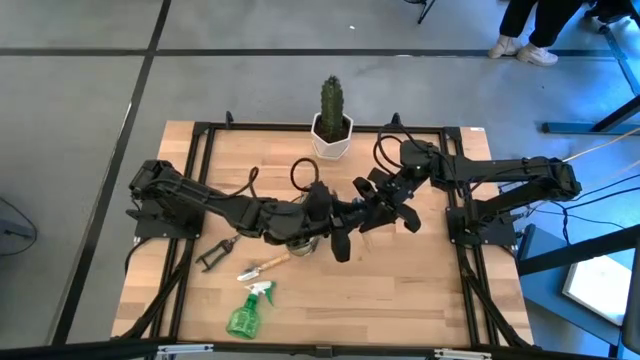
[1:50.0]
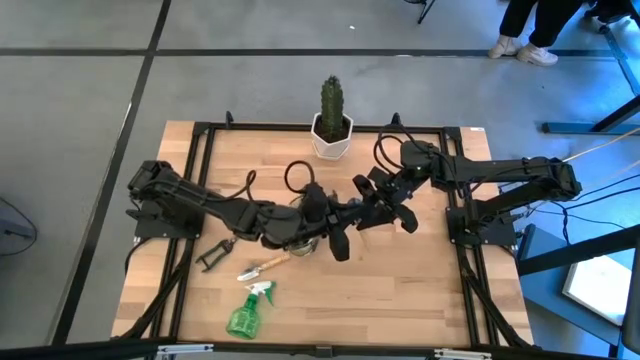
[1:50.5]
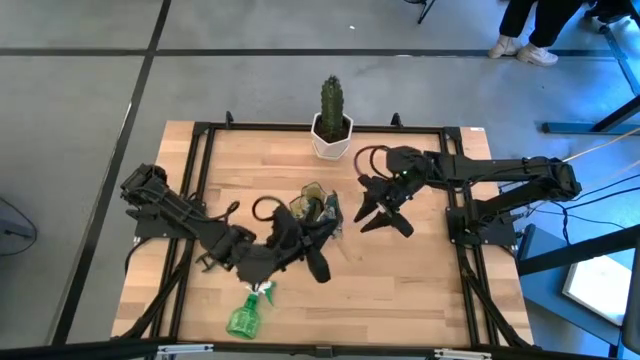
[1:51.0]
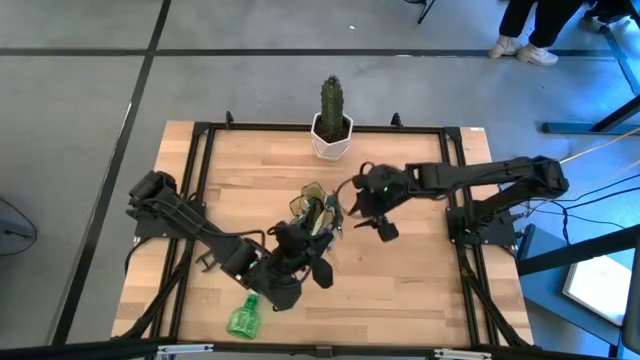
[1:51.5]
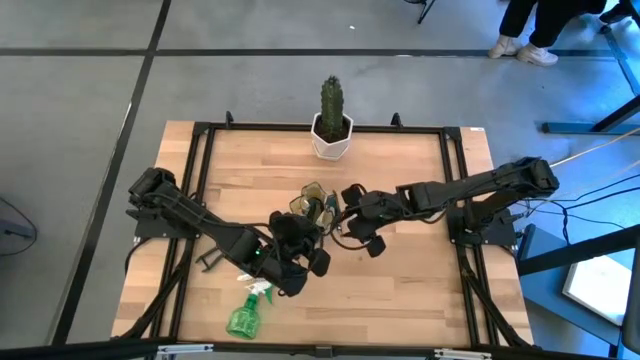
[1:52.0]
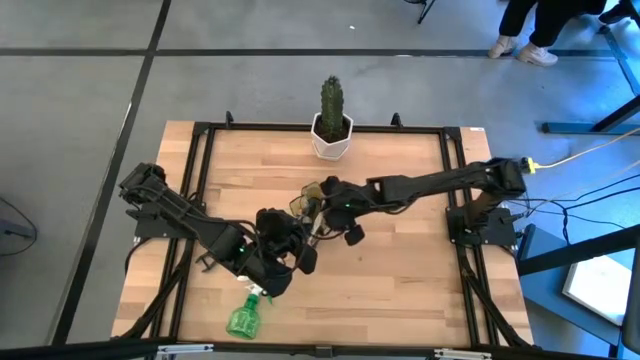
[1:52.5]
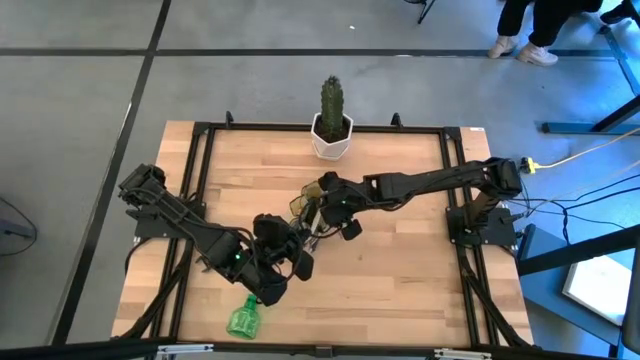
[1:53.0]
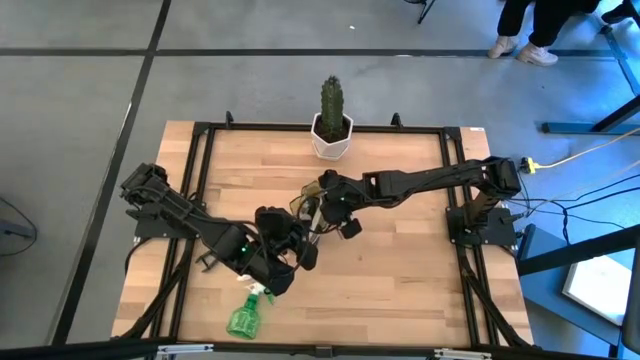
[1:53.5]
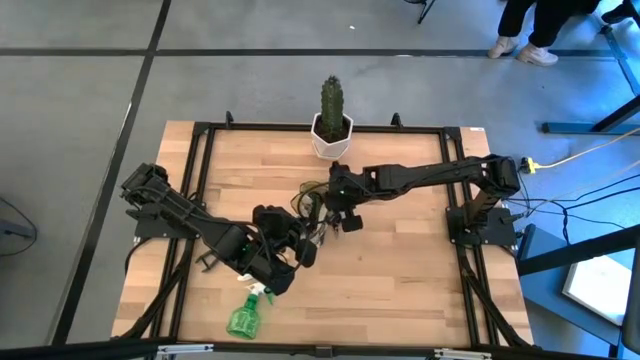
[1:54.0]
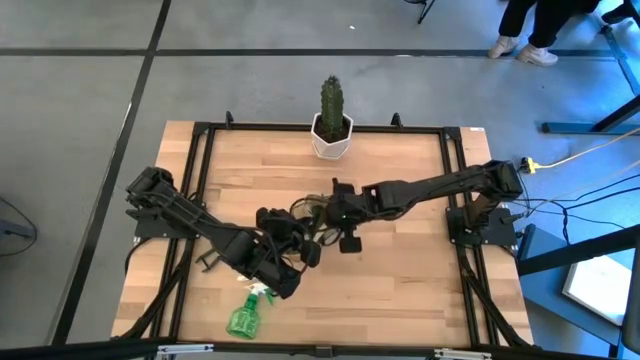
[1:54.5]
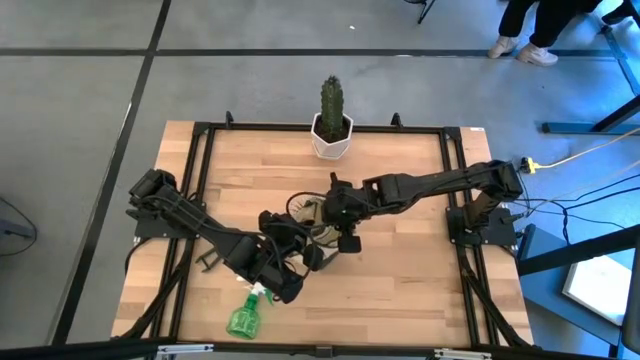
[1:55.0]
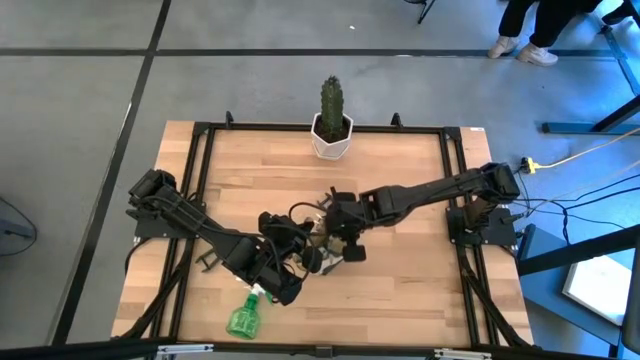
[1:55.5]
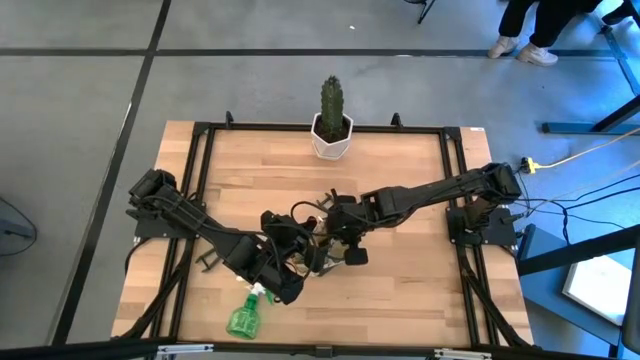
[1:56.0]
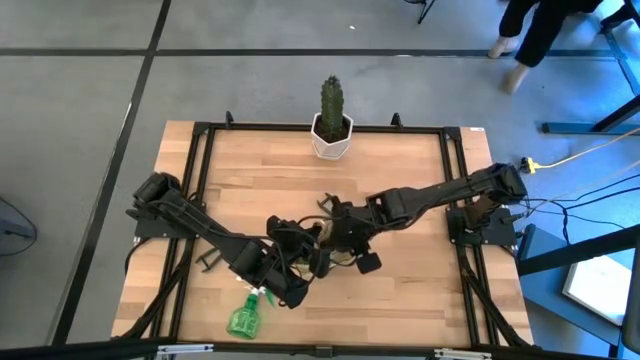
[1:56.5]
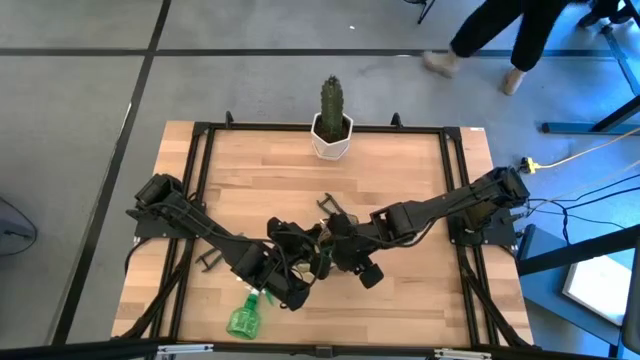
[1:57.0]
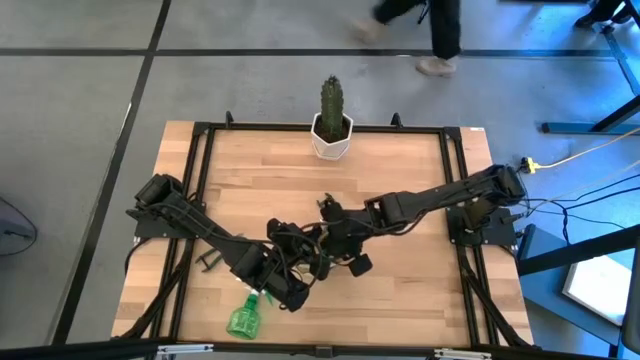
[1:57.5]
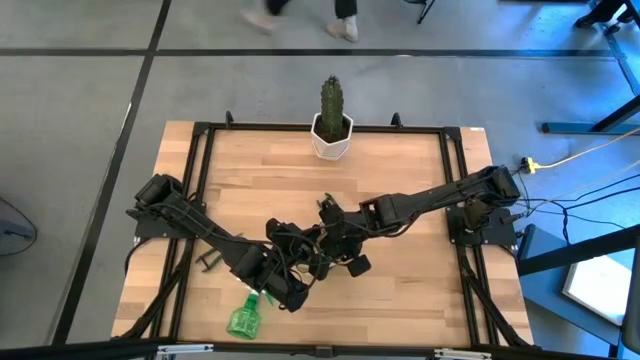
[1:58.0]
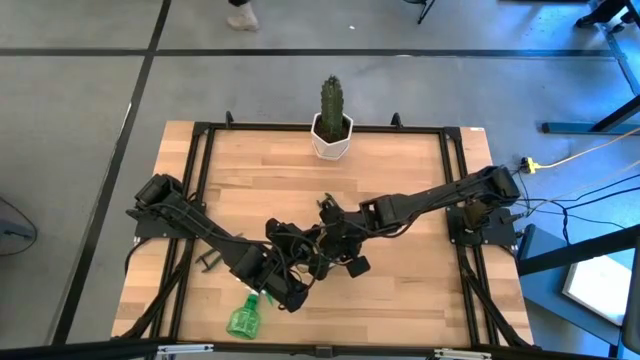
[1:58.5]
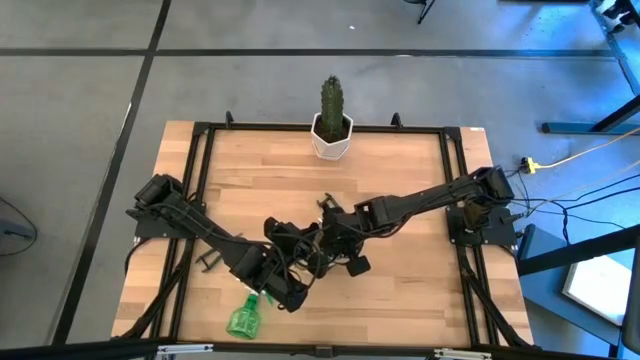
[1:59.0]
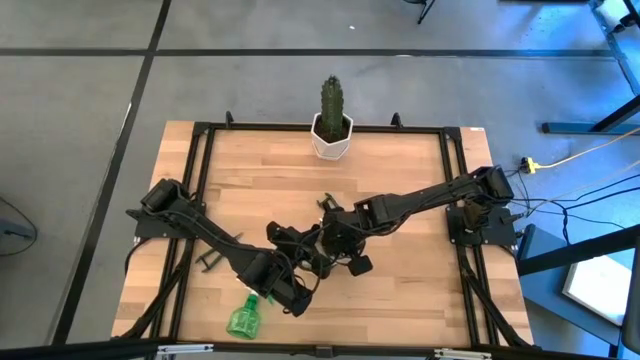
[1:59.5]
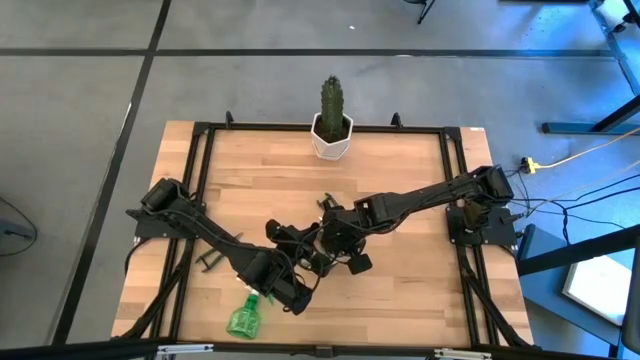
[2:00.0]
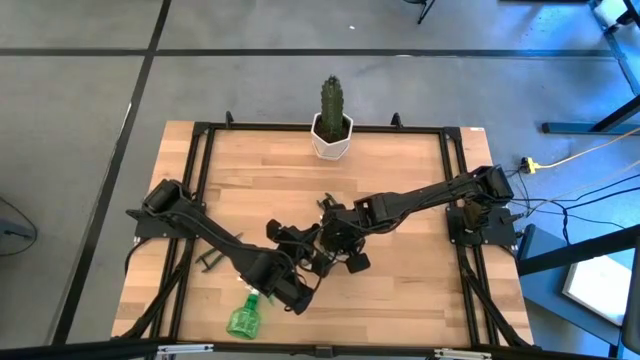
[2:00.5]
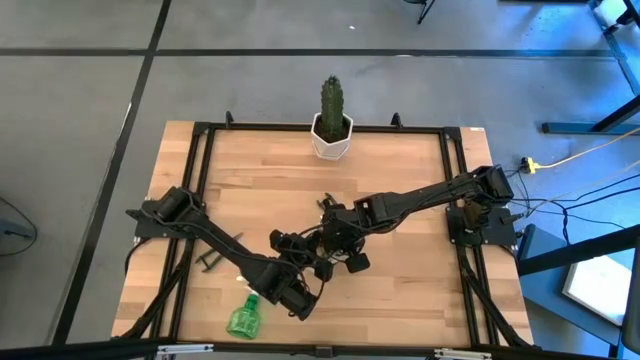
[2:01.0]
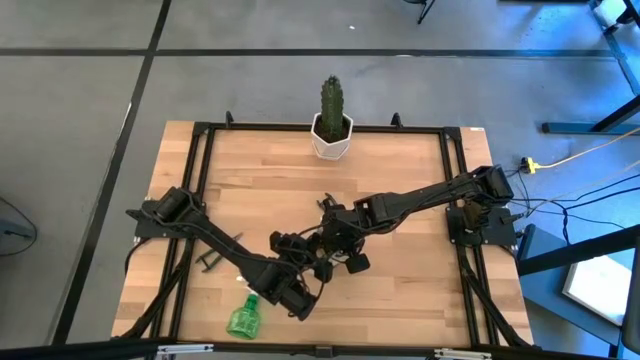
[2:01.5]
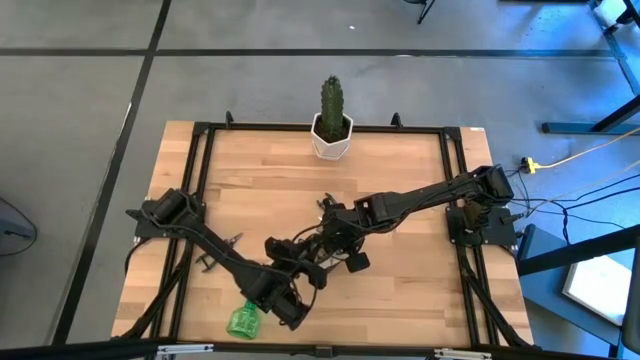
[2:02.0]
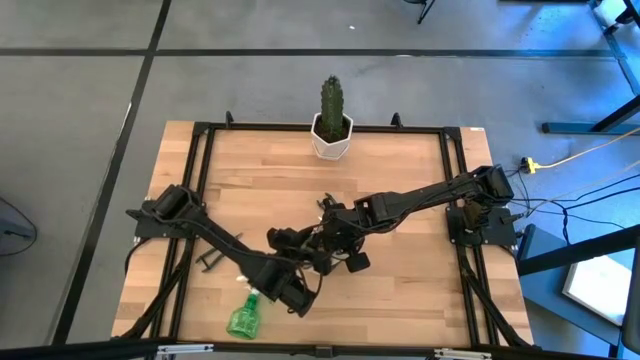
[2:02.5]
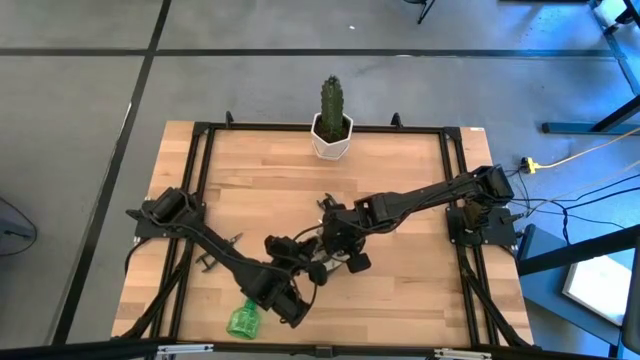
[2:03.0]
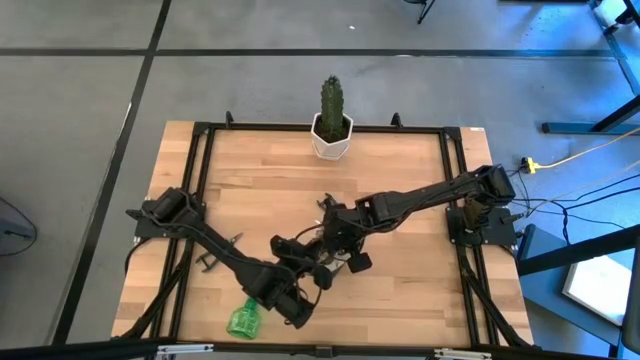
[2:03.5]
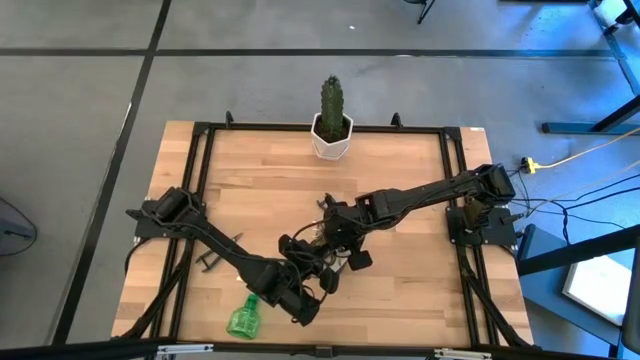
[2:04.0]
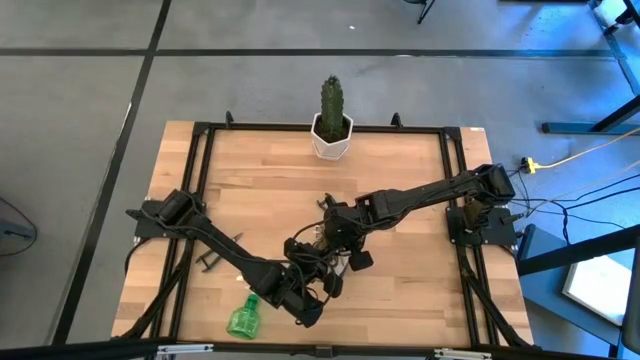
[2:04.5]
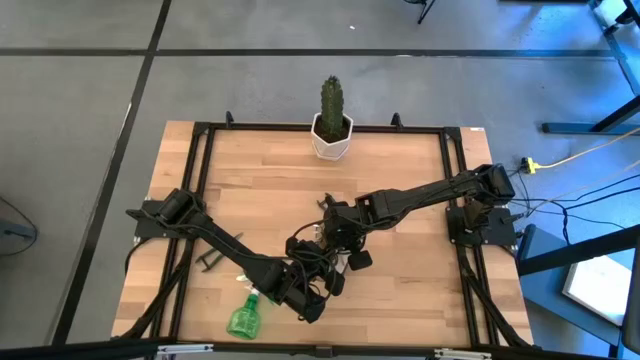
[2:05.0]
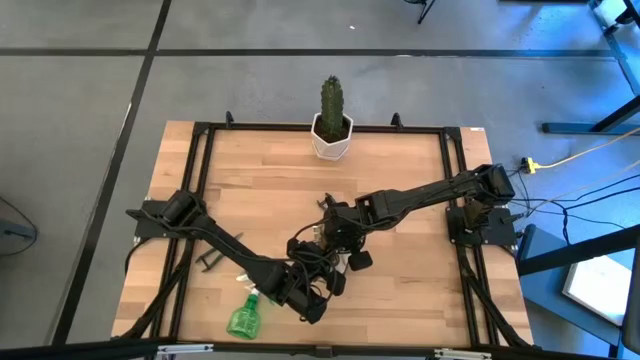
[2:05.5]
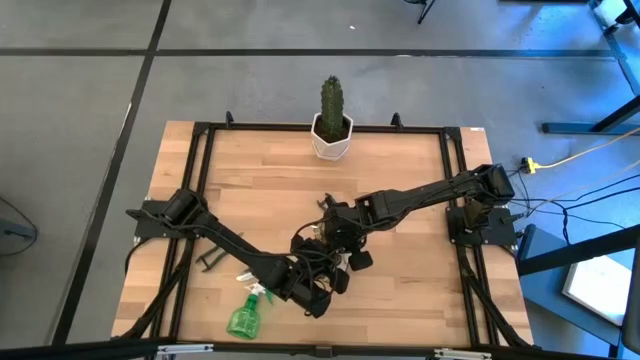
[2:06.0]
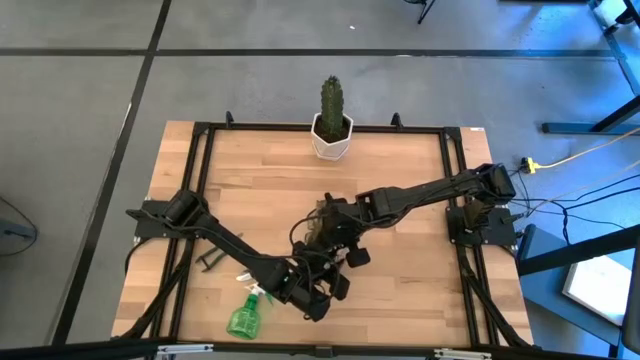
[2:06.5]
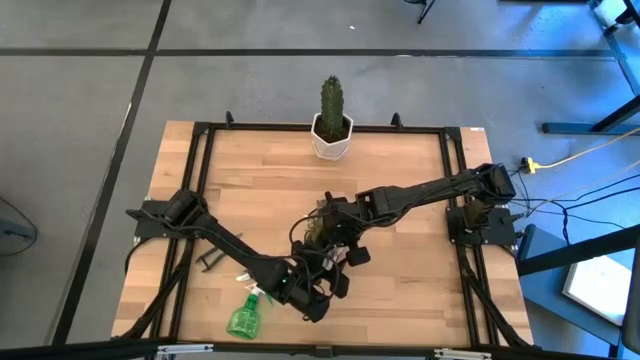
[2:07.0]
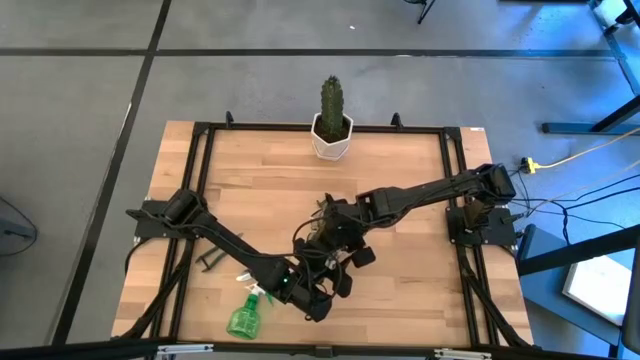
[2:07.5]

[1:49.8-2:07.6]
Task: Pick & Place Garden tools in Gardening bag
Put the right brown trowel into the green gardening bag

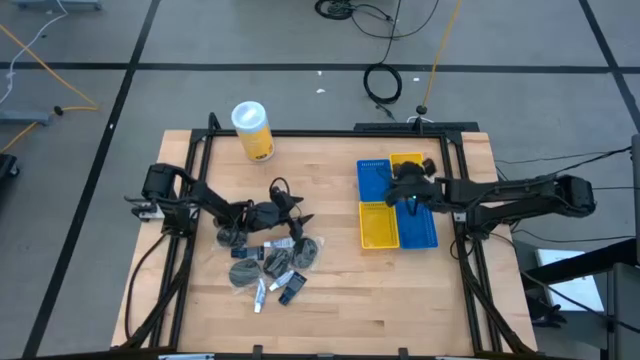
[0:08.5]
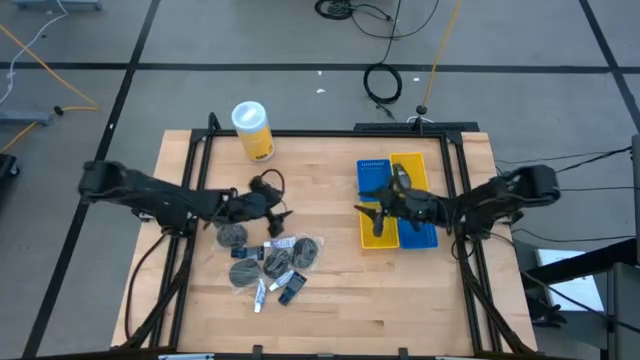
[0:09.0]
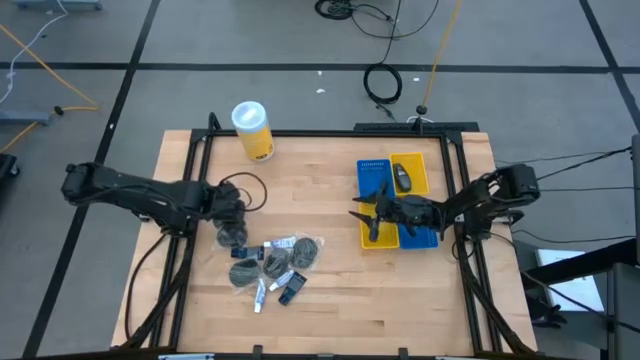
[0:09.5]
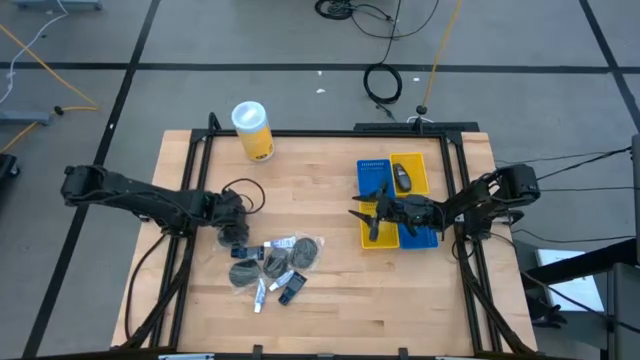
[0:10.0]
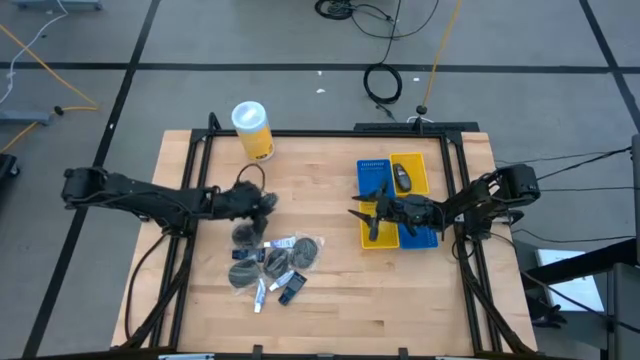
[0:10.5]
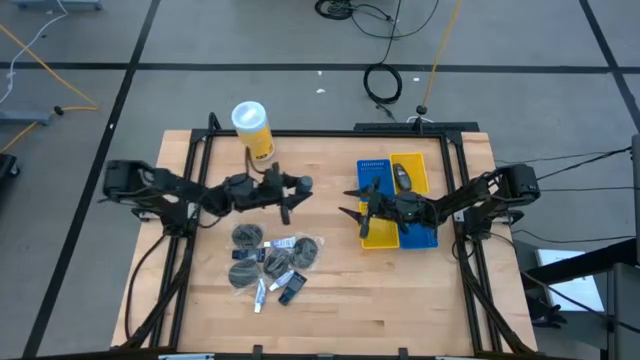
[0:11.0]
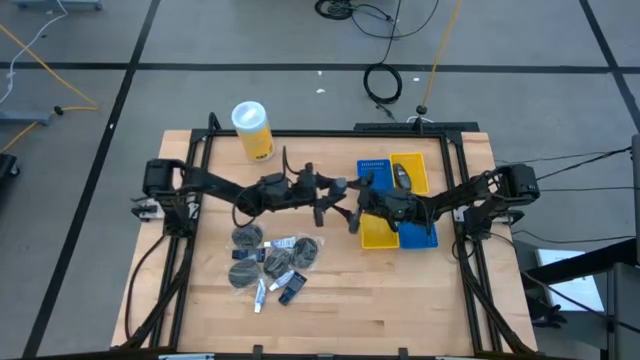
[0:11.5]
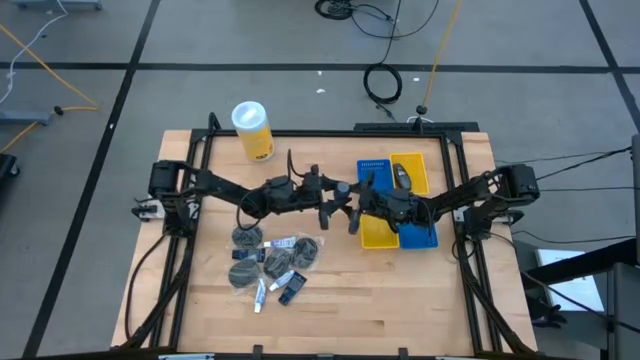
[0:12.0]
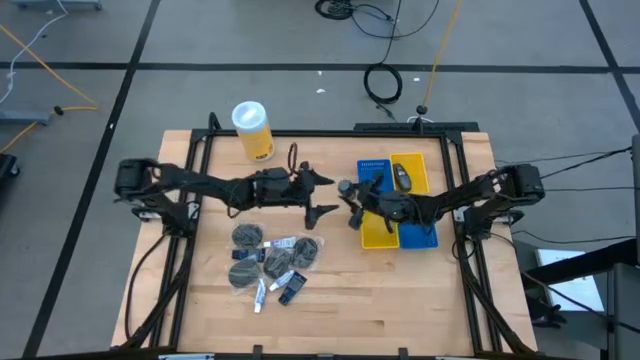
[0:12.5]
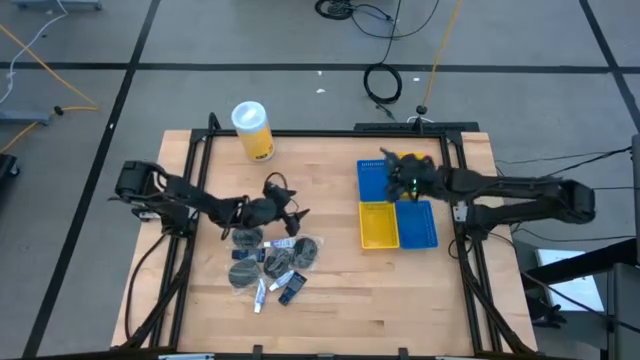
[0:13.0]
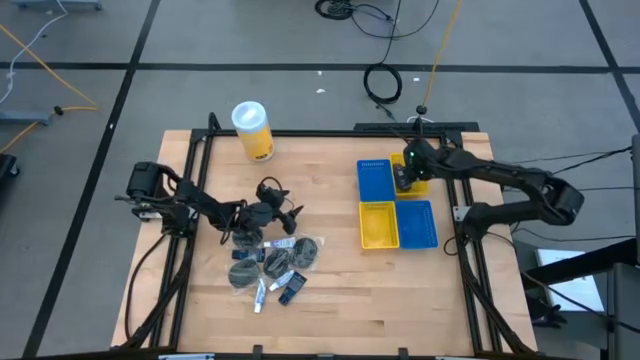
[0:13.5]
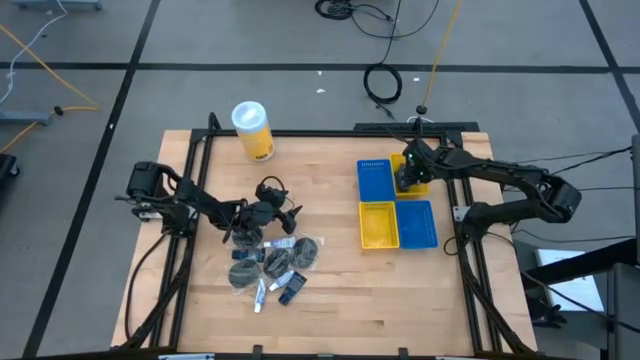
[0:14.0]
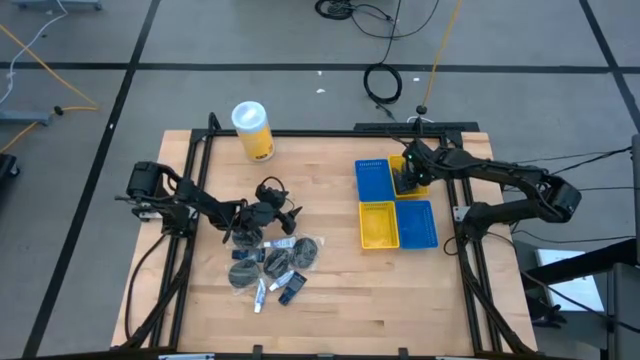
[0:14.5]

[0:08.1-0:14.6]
Task: Pick & Place Travel size toiletries
Put the gray deodorant into the top yellow bin
